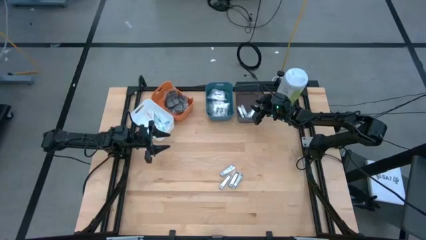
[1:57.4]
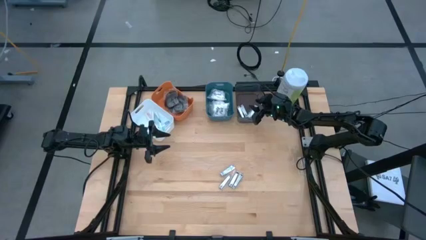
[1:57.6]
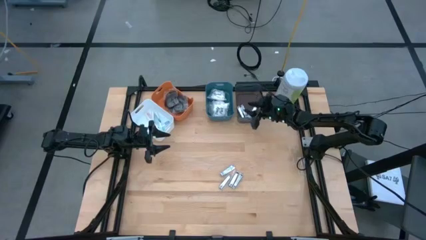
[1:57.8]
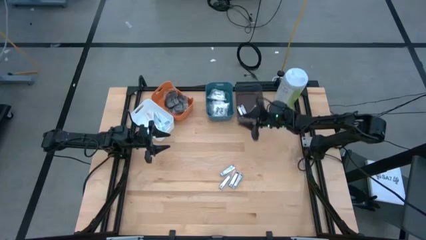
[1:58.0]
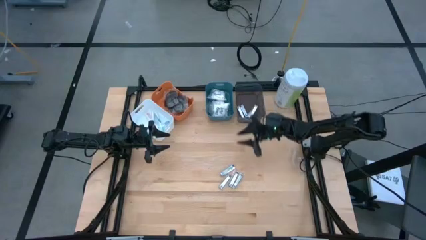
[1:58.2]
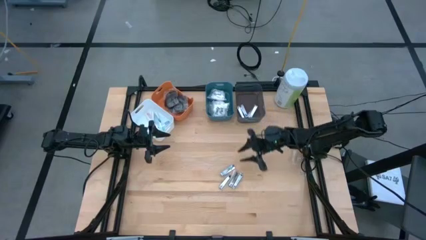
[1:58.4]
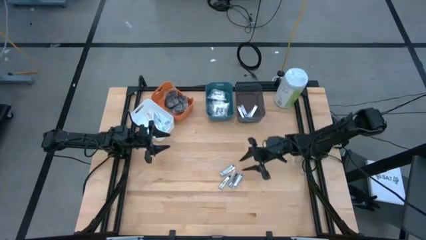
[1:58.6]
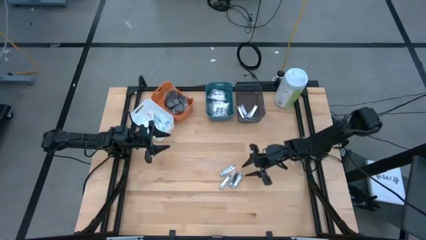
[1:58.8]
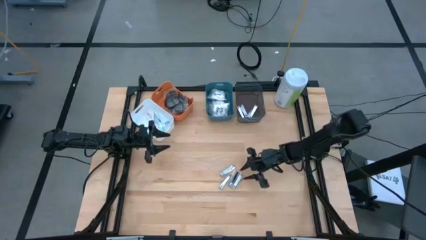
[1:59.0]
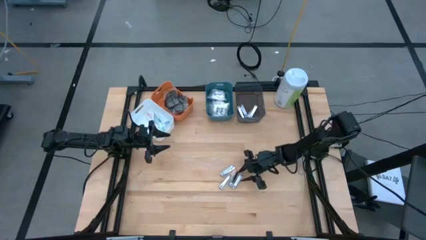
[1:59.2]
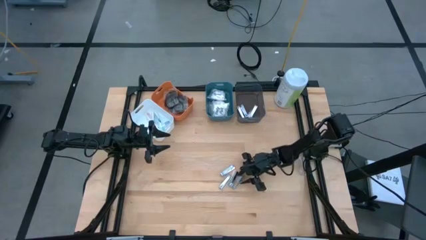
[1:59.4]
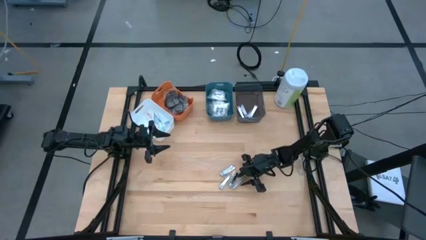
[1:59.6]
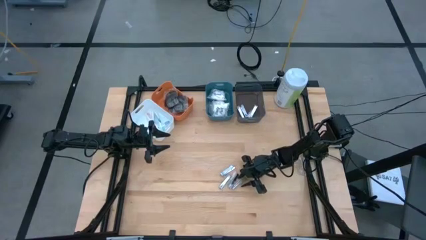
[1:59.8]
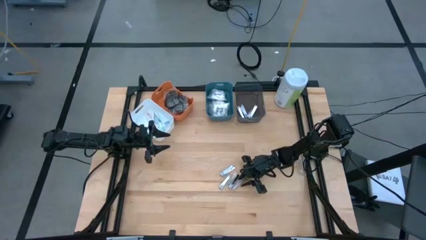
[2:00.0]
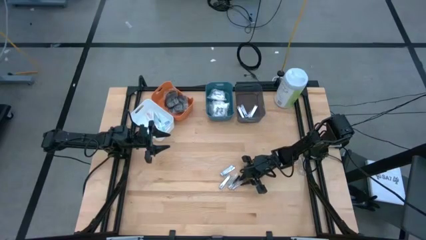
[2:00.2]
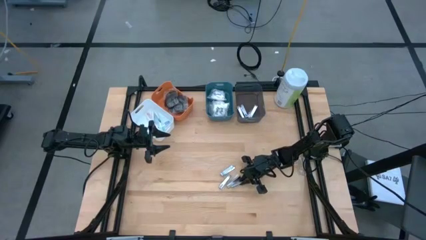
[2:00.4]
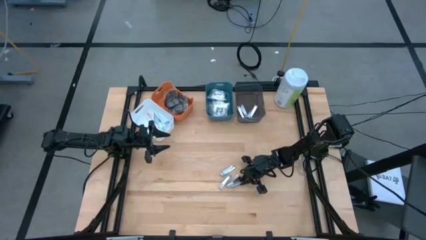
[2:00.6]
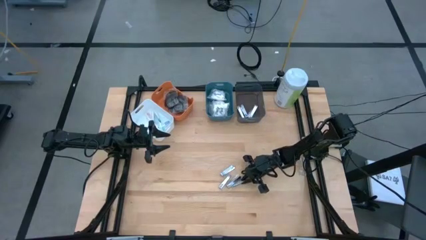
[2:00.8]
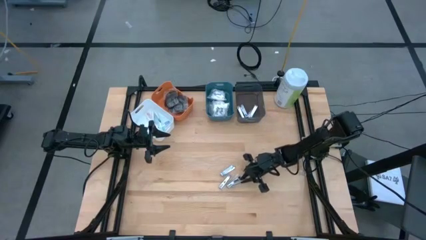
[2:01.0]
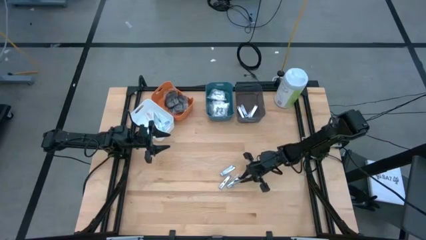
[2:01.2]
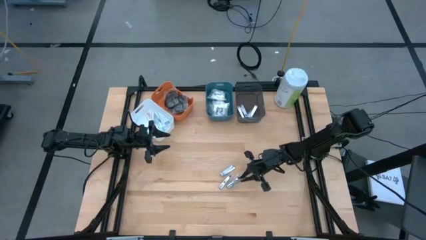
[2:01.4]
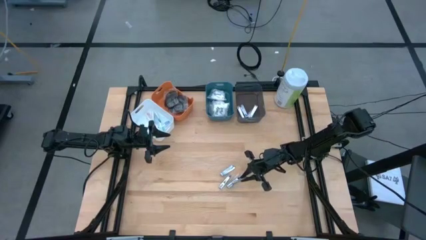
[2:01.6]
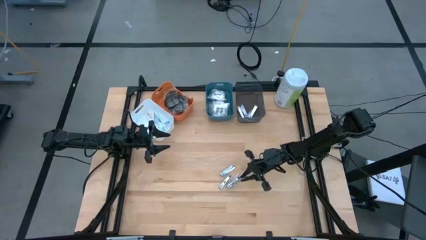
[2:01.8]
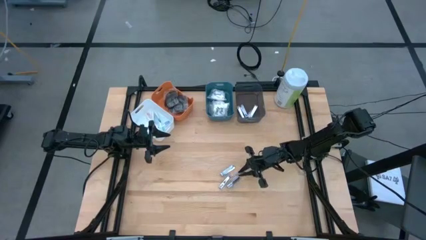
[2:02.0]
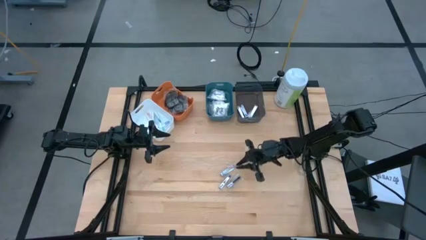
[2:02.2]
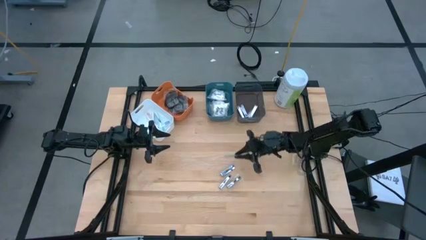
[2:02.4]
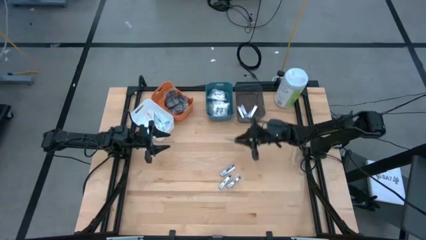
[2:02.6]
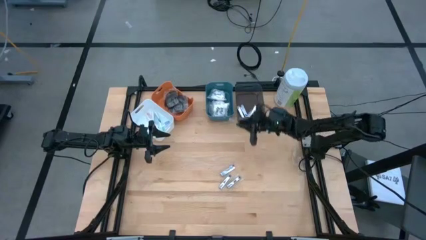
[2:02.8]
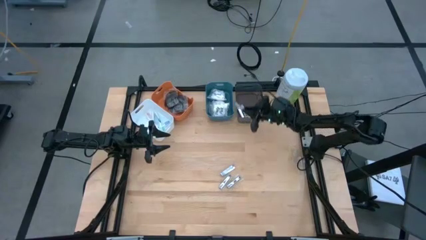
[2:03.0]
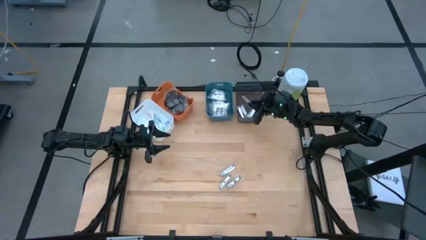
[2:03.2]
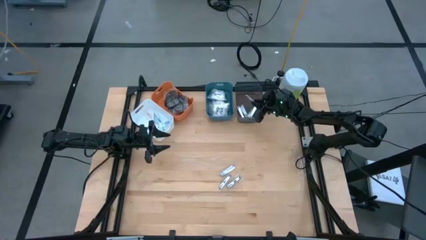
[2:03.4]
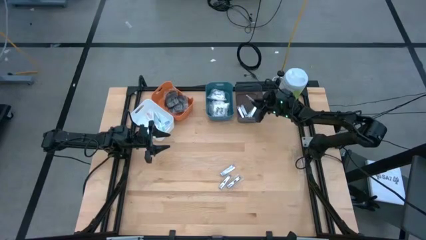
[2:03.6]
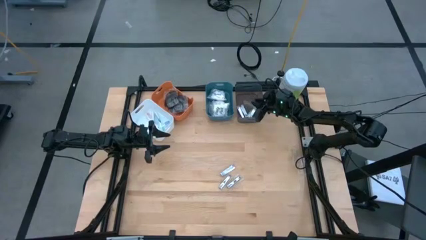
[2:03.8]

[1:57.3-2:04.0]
Task: Pick & Place Travel size toiletries
Put the silver nail cutter into the black bin

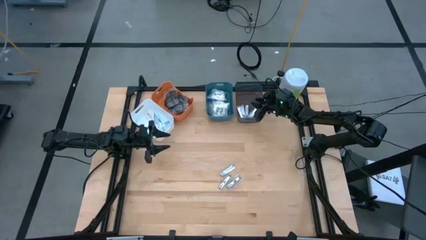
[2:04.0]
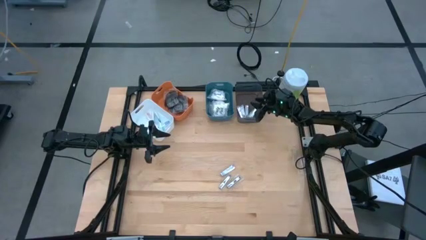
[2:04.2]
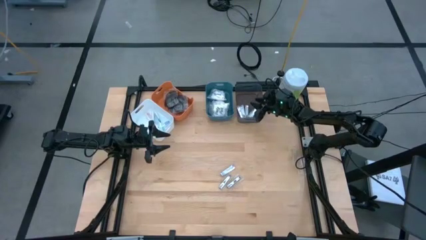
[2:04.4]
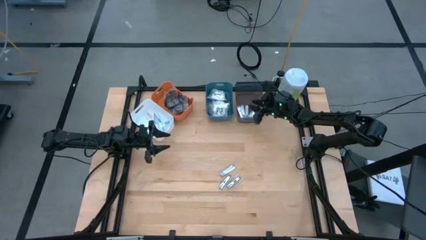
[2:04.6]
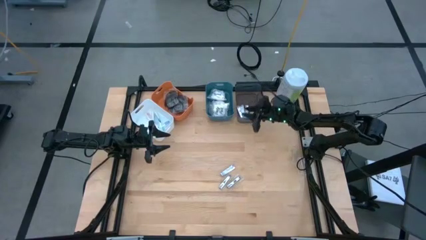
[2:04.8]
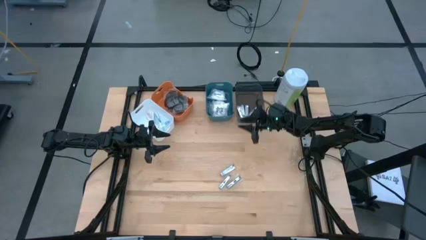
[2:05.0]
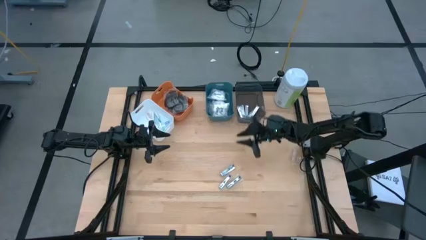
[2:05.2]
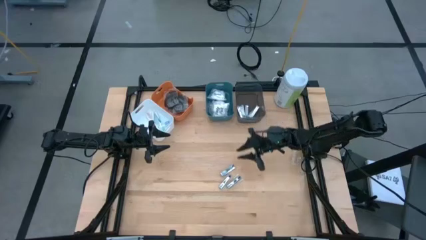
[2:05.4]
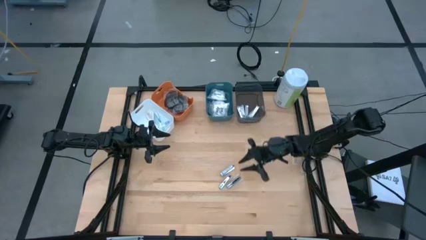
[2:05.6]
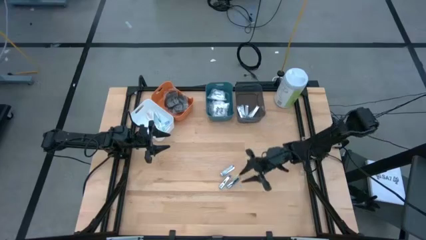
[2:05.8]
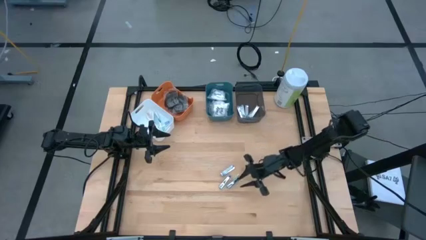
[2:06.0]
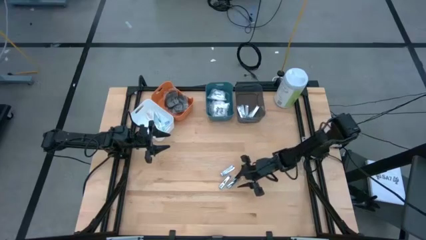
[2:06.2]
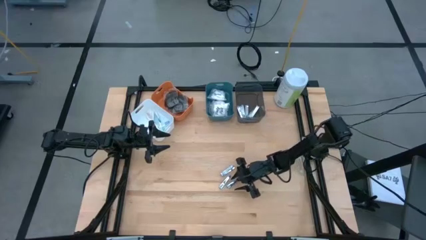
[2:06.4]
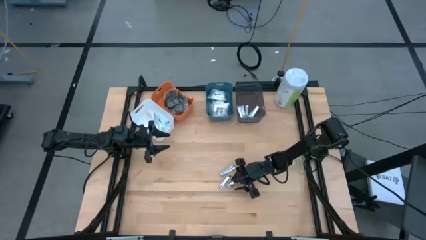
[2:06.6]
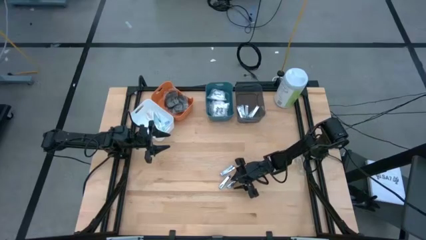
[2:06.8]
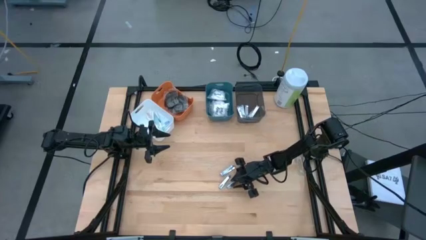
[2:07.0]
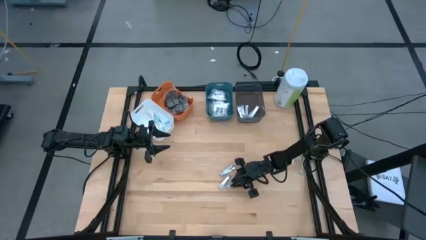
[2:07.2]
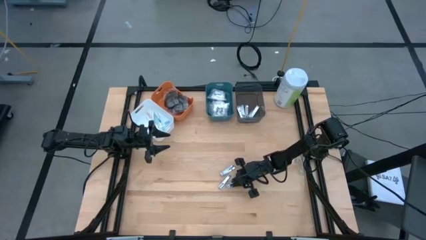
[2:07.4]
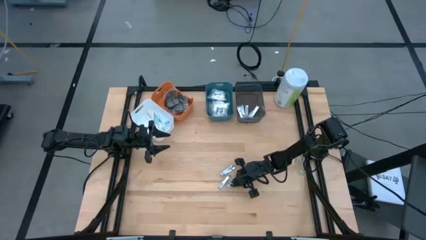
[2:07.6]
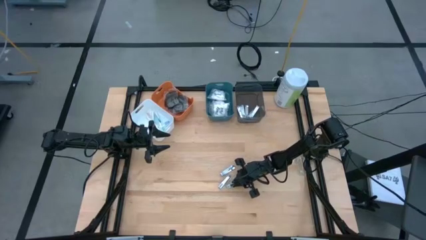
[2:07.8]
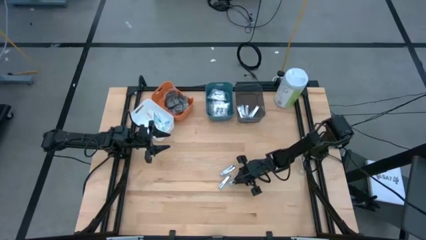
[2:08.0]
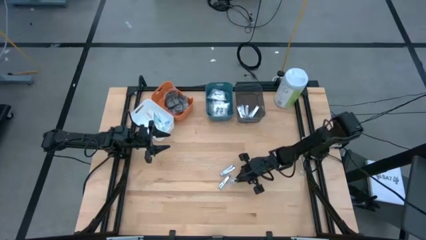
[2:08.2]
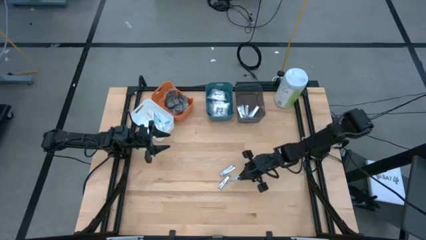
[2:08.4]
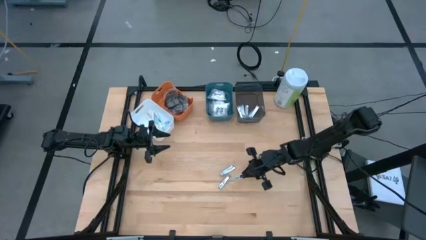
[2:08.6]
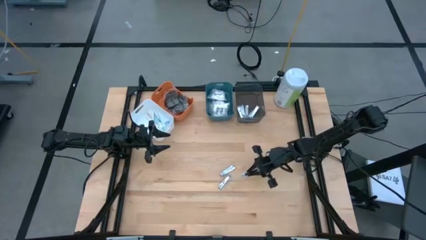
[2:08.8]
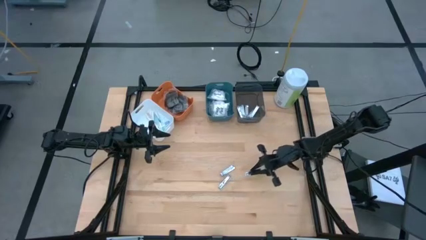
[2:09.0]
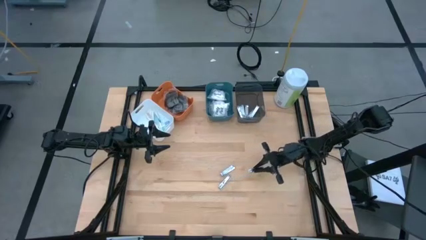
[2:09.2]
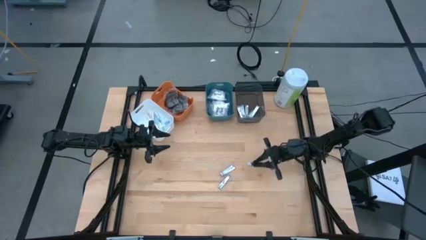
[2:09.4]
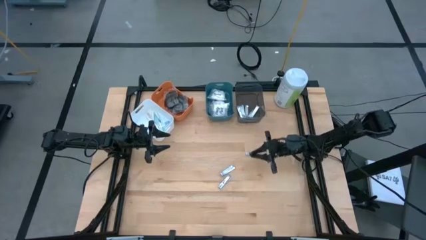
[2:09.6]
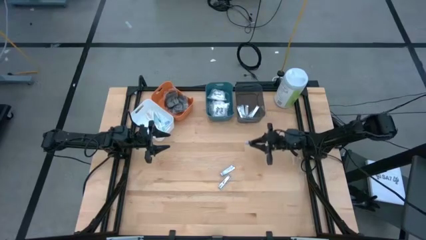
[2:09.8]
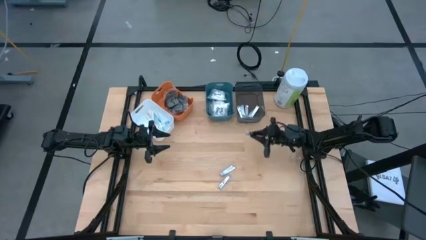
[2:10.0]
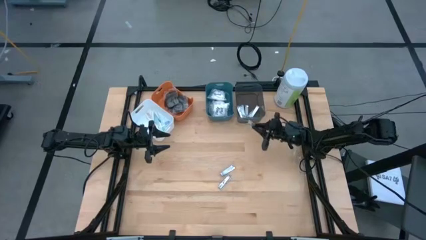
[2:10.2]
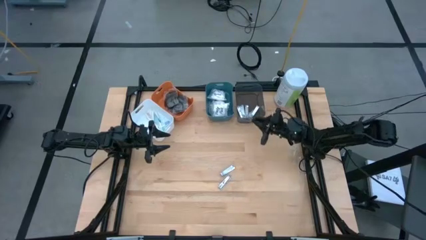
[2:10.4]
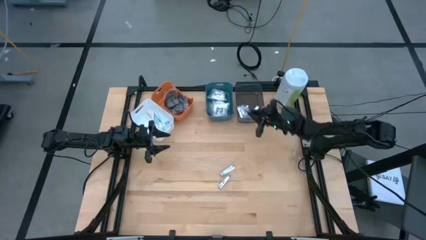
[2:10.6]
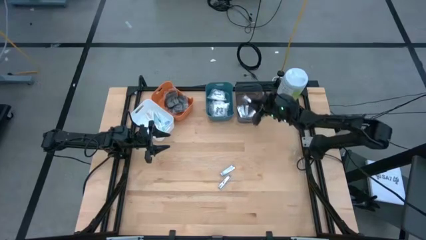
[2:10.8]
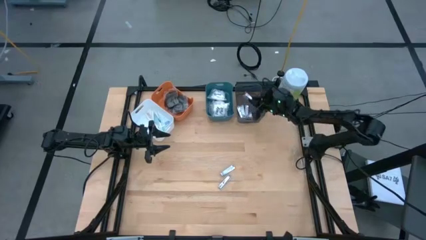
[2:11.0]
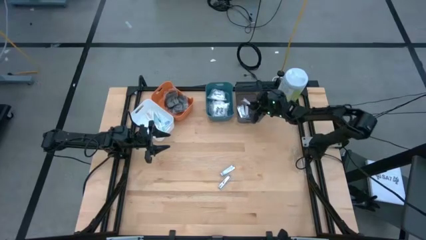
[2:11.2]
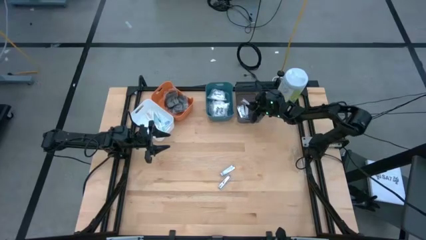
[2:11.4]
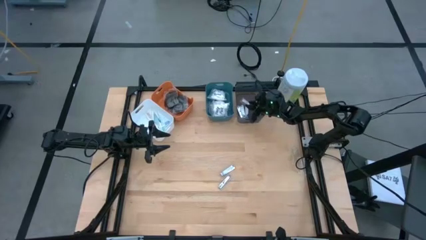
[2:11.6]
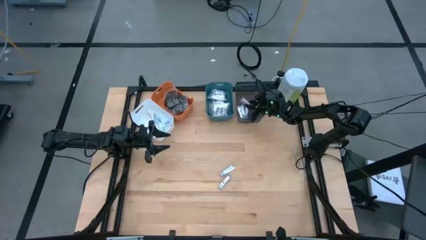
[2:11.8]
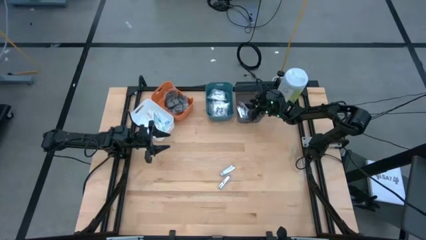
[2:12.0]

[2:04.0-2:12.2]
Put the silver nail cutter into the black bin

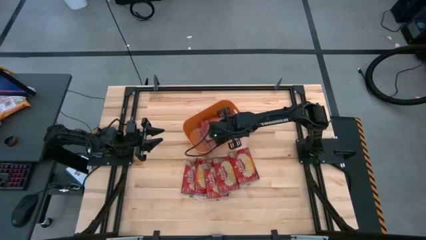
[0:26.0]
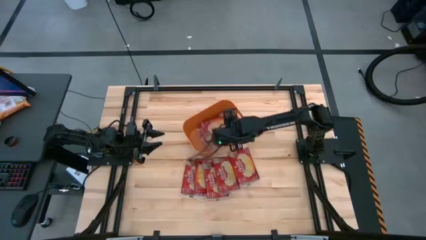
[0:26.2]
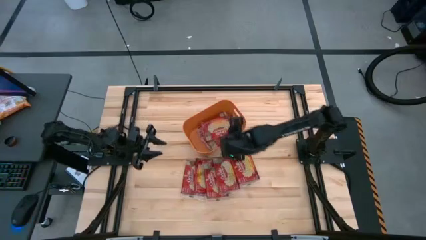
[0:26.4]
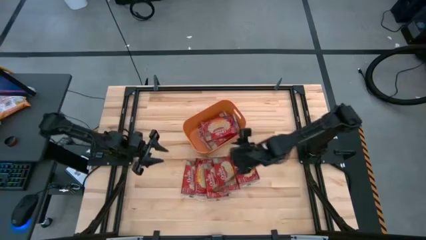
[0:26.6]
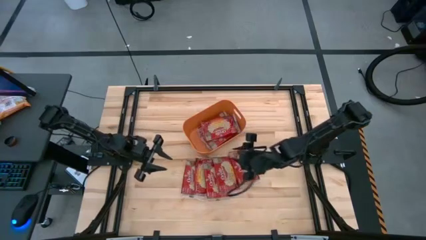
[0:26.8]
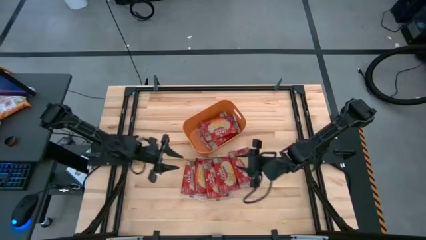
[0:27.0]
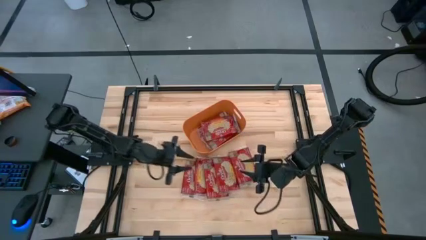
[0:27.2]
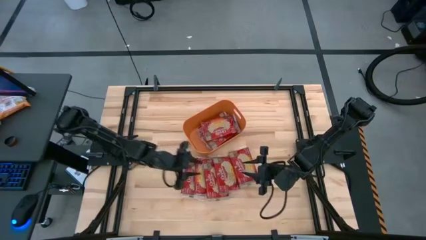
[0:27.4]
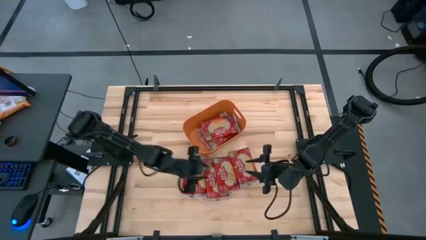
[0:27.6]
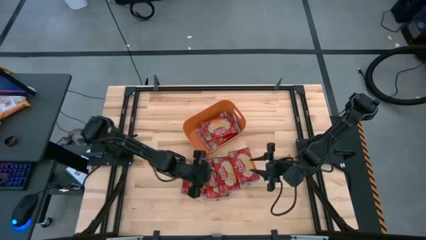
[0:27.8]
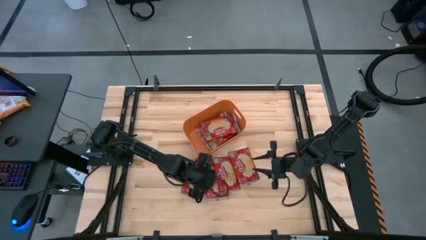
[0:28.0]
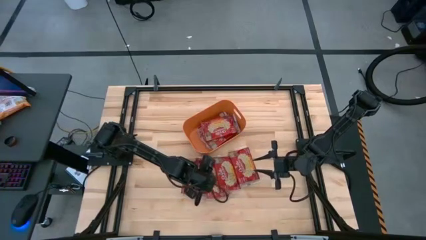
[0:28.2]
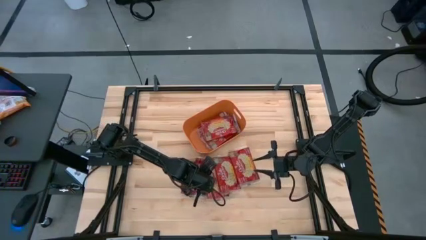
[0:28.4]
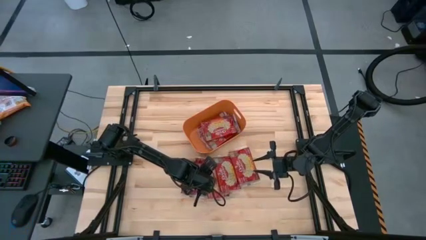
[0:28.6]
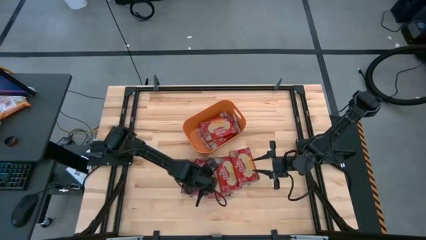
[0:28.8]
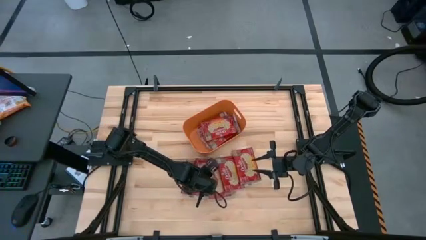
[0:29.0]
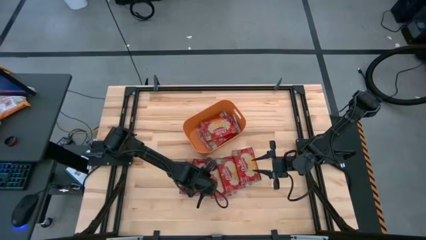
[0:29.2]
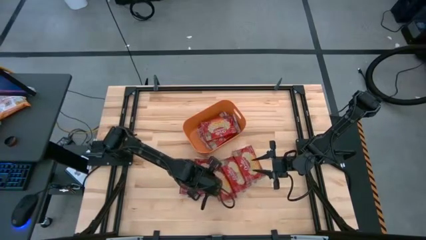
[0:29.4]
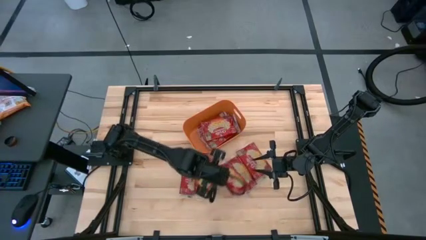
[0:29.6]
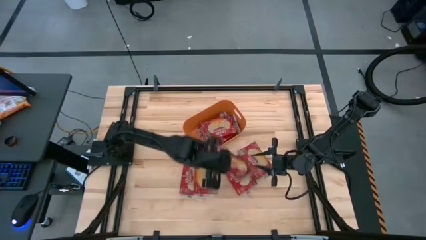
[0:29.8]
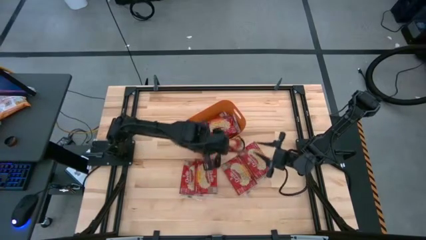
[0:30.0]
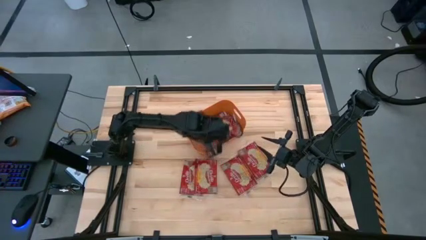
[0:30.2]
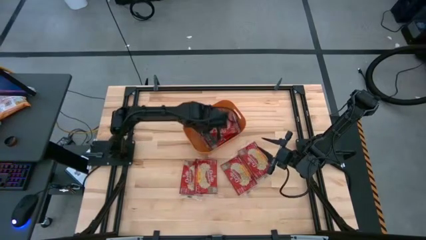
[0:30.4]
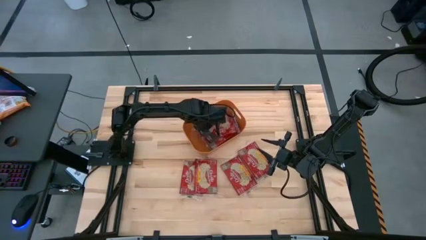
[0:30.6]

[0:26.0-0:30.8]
Task: Sort popcorn bags into baskets
Put the pop corn bag into the orange bin
